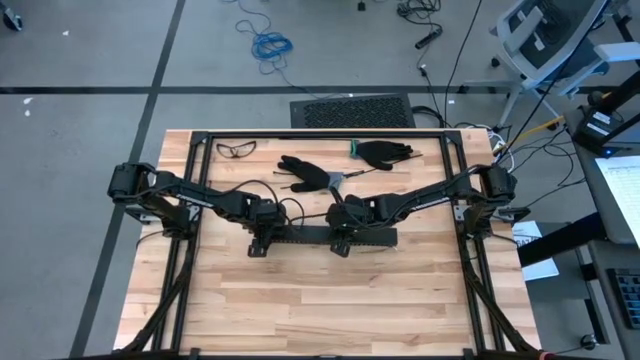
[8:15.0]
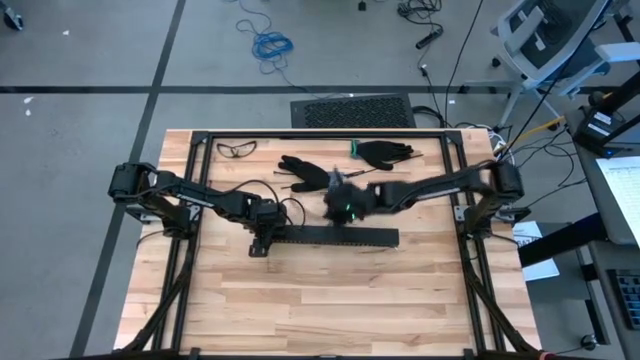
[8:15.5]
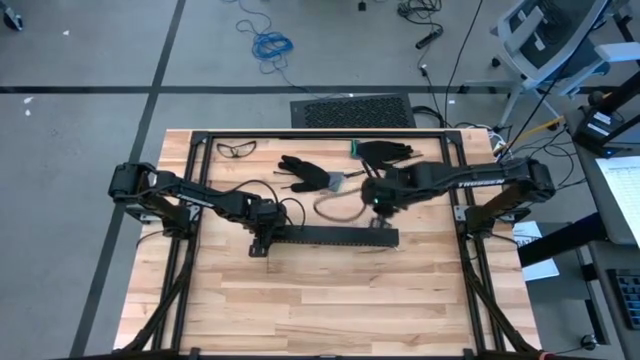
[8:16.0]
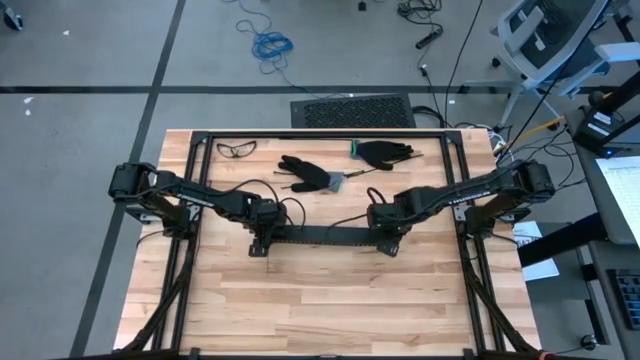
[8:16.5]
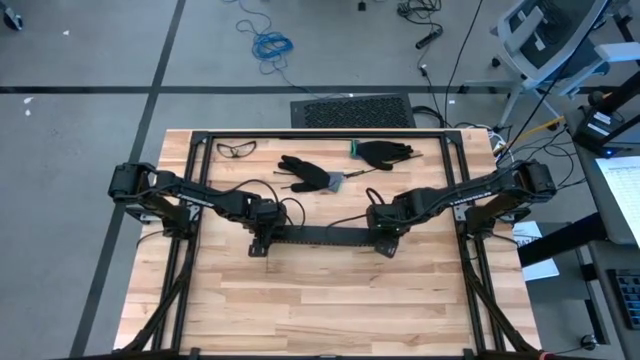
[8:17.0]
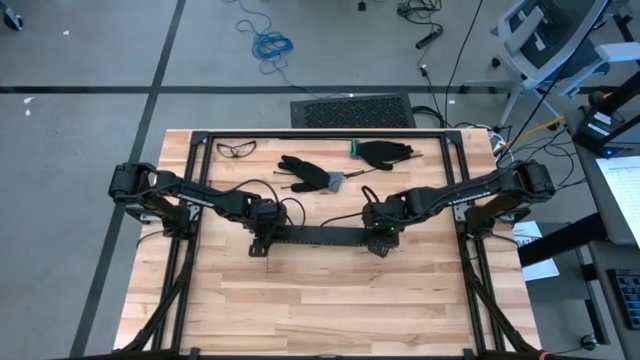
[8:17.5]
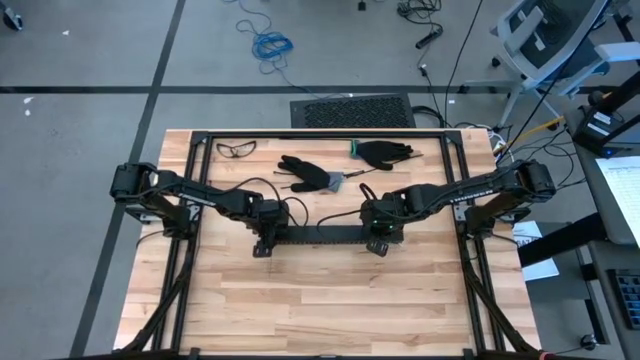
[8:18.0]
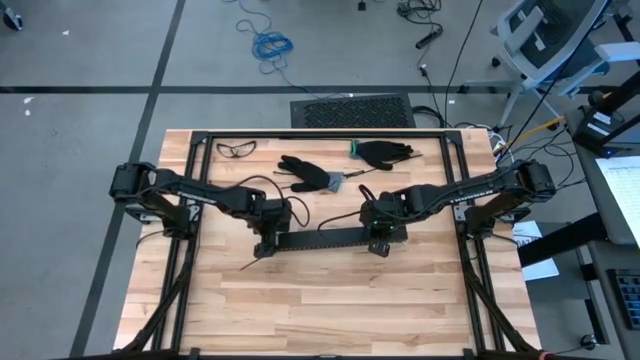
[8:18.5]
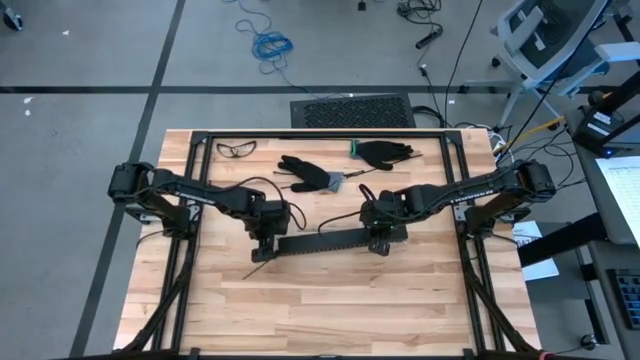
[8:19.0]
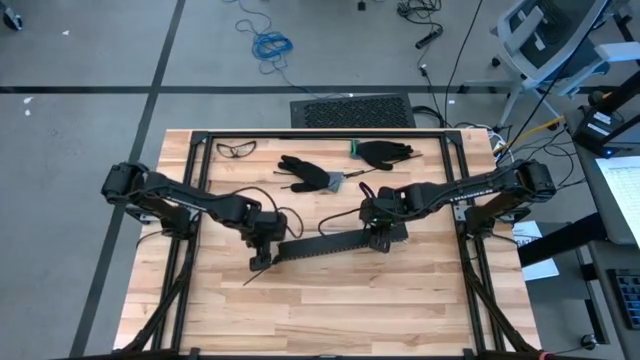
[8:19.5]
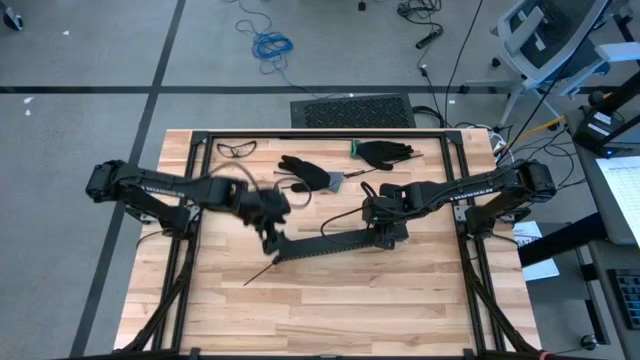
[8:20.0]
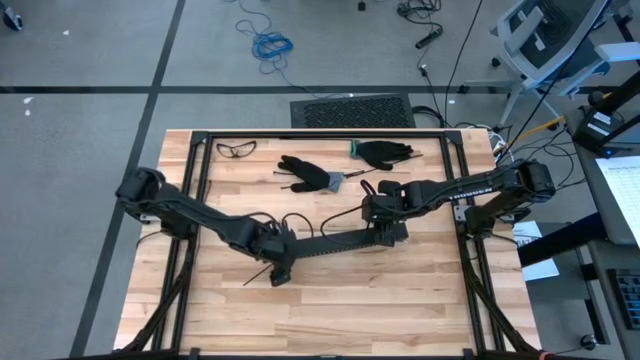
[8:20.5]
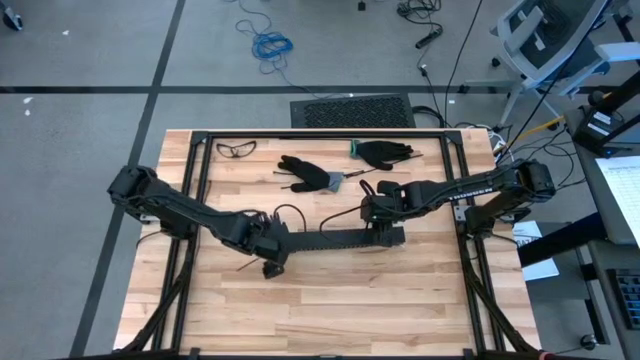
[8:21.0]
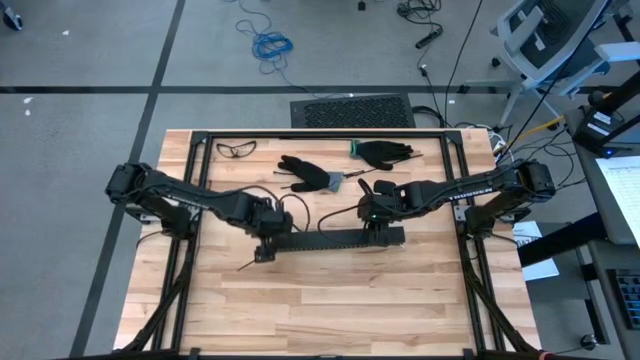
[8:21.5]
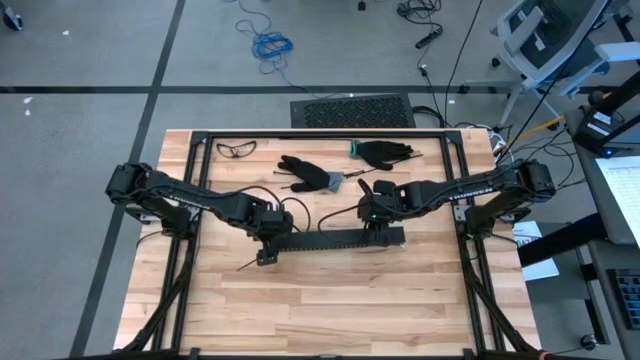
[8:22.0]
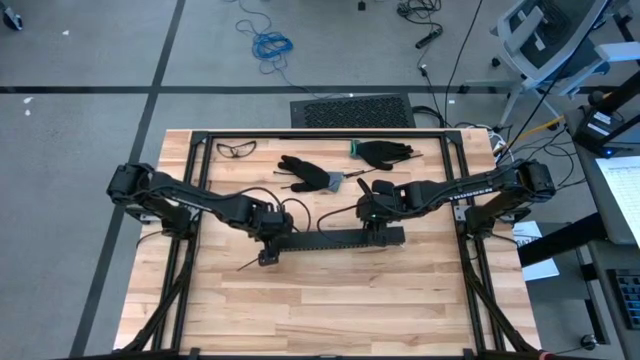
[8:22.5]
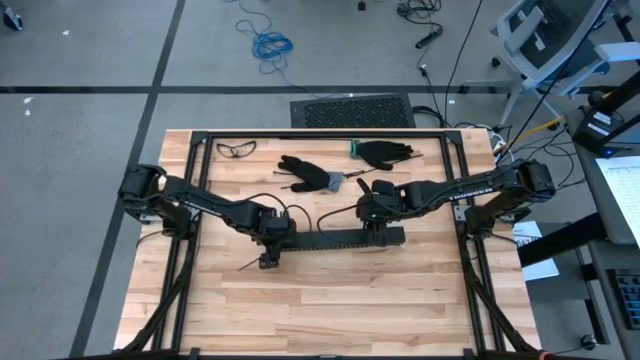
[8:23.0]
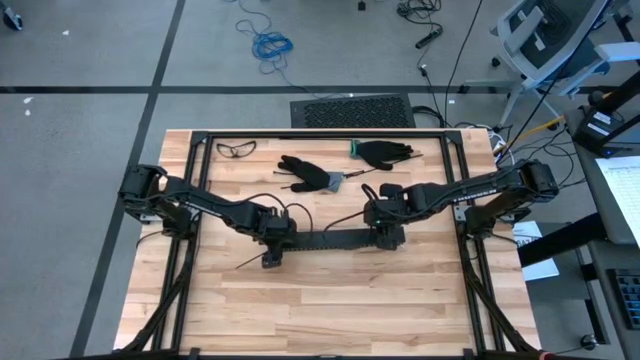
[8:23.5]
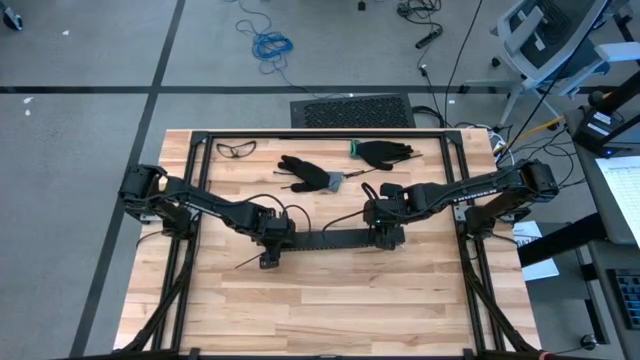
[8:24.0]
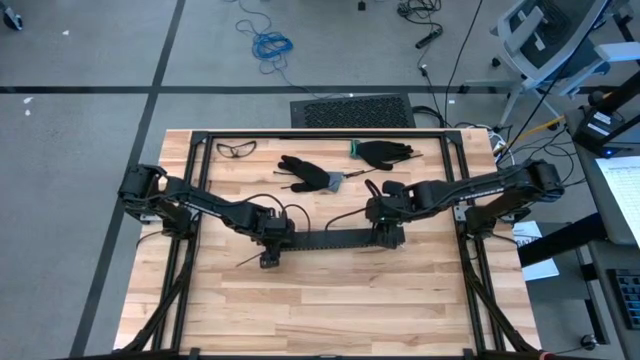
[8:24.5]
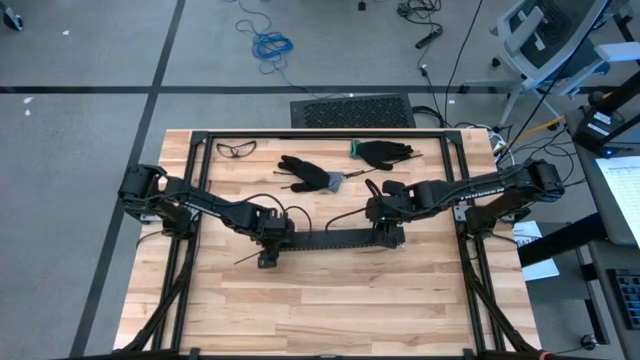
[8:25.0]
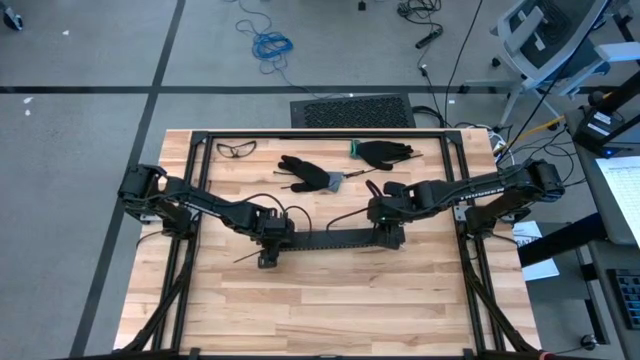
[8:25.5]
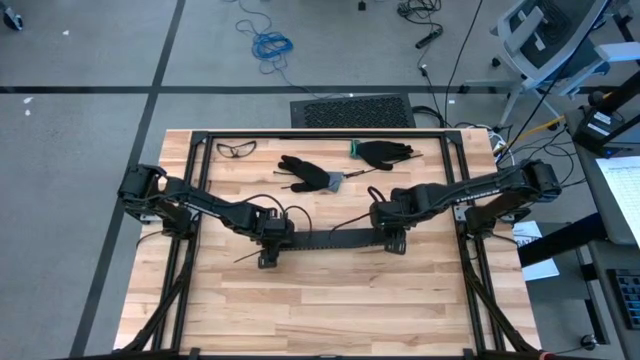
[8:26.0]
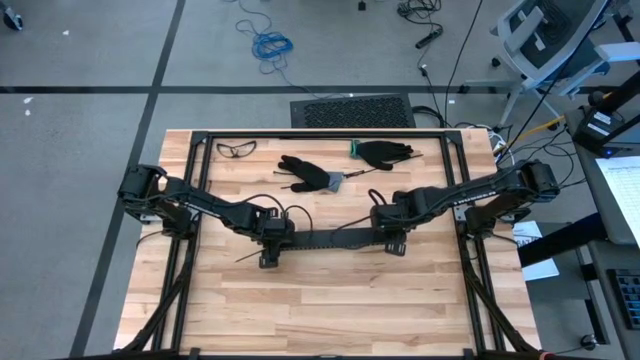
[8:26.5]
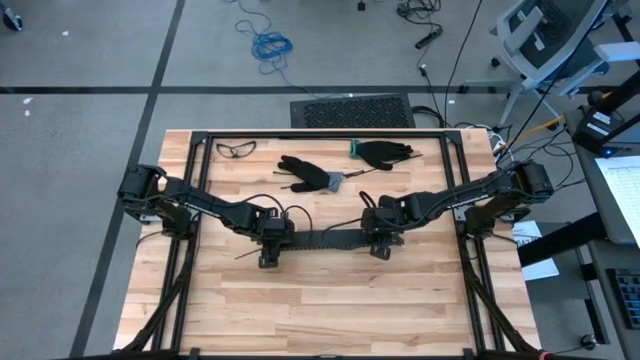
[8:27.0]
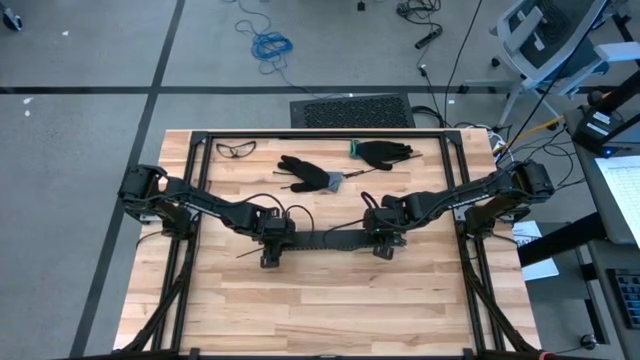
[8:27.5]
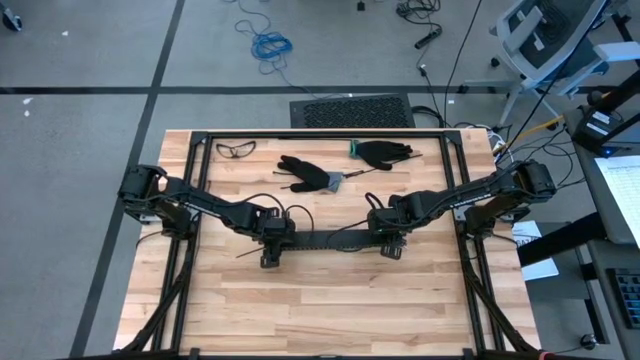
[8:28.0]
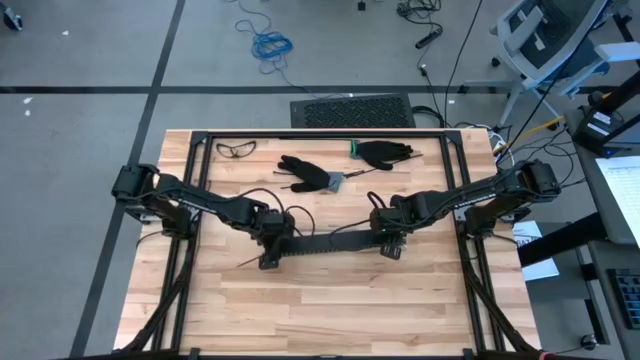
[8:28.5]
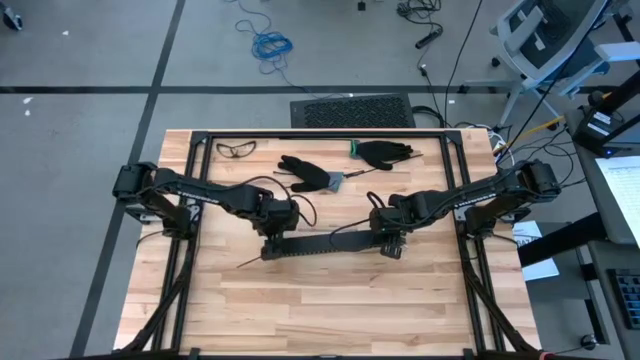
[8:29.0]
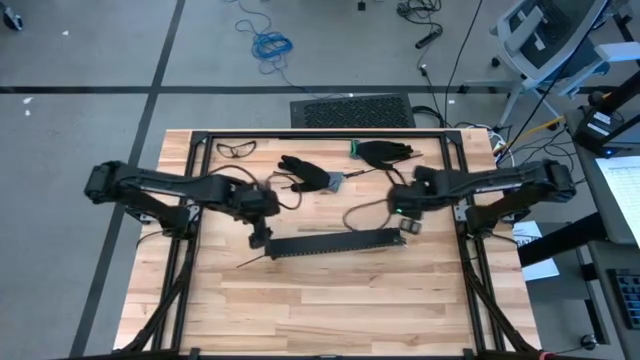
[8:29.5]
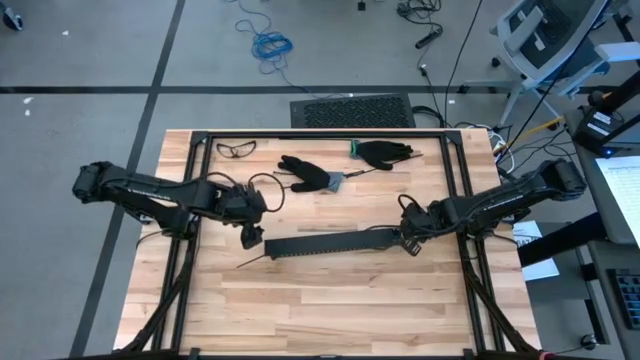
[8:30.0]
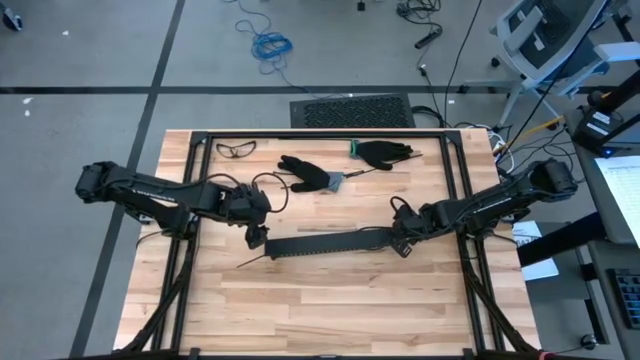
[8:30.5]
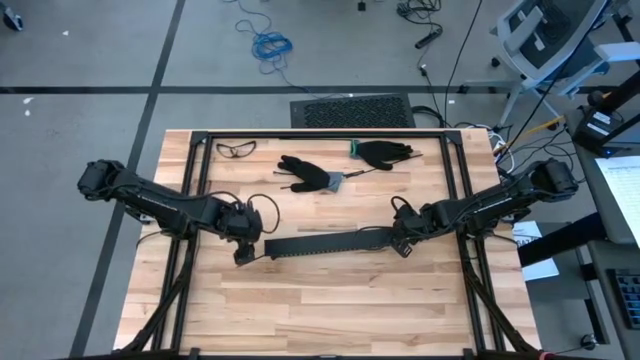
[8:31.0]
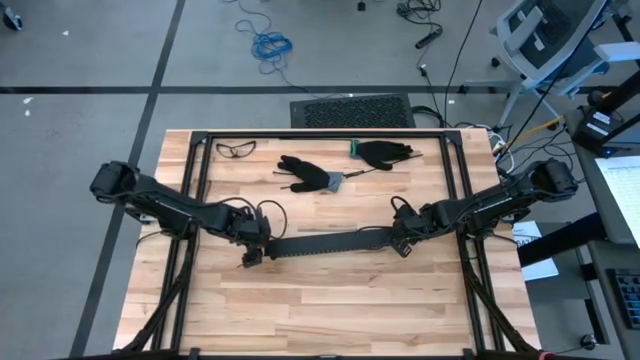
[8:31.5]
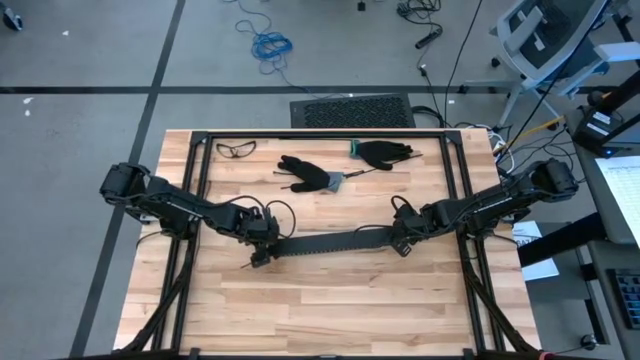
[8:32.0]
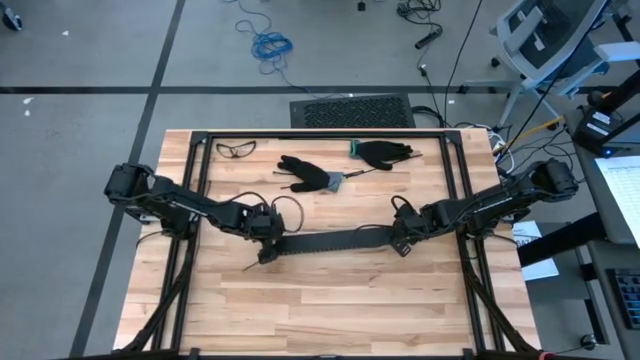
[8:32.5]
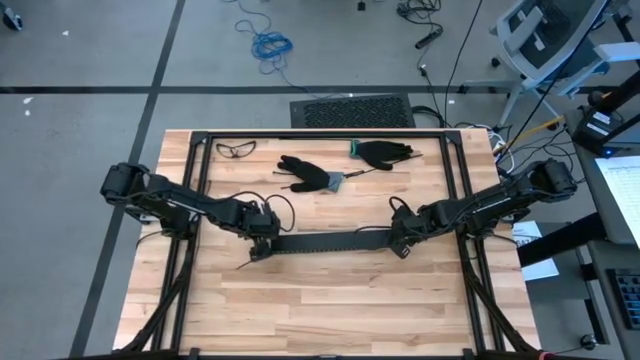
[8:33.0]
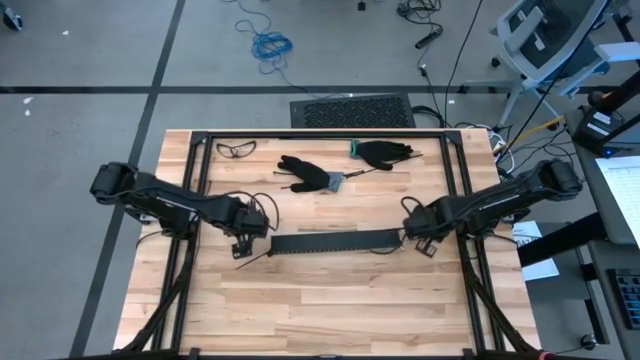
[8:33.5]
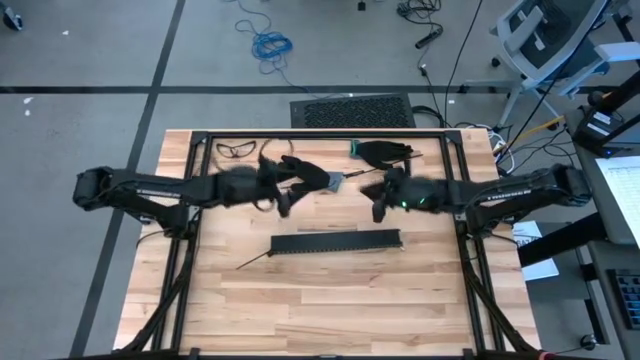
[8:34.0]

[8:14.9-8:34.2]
Task: Ziptie cables
Insert the black cover of the black cable duct

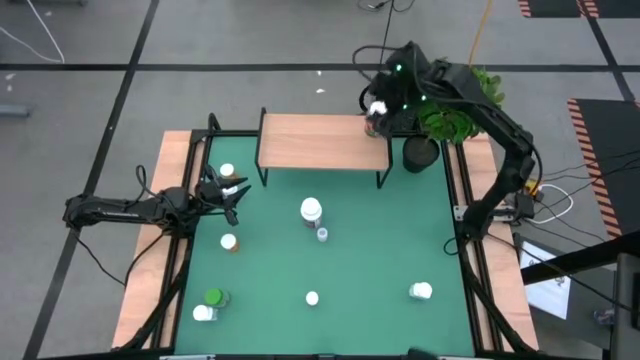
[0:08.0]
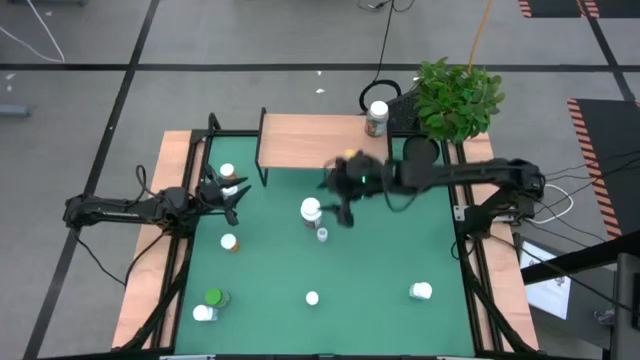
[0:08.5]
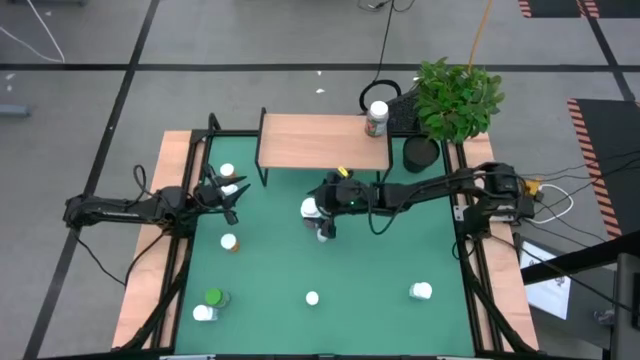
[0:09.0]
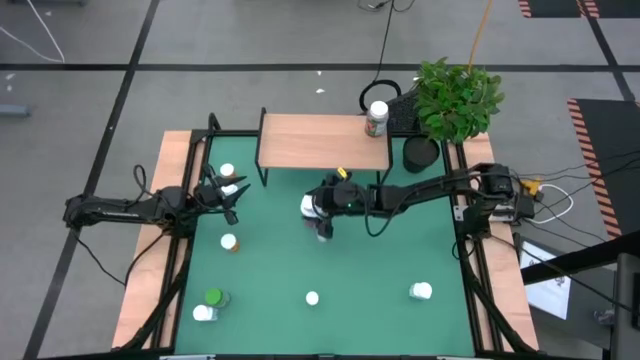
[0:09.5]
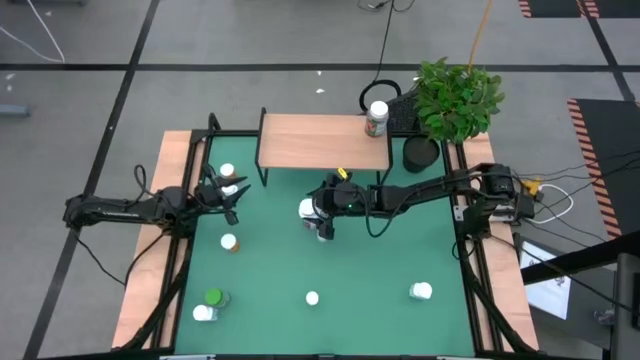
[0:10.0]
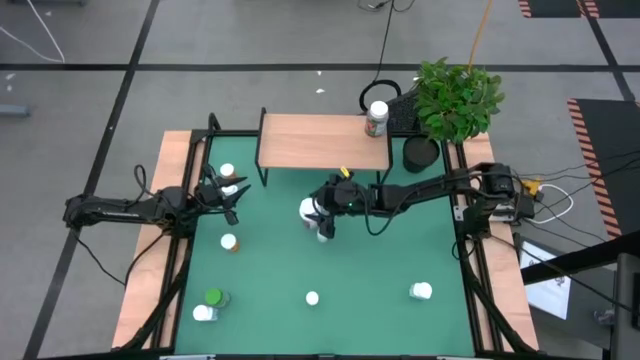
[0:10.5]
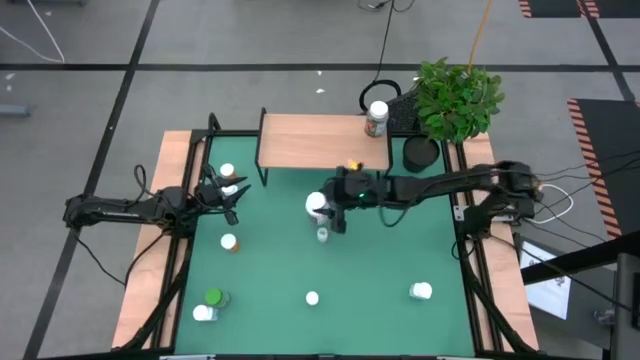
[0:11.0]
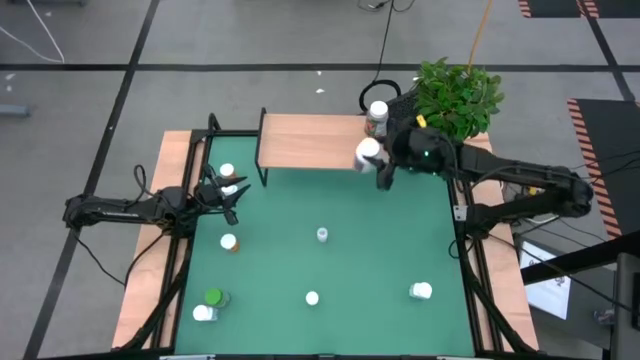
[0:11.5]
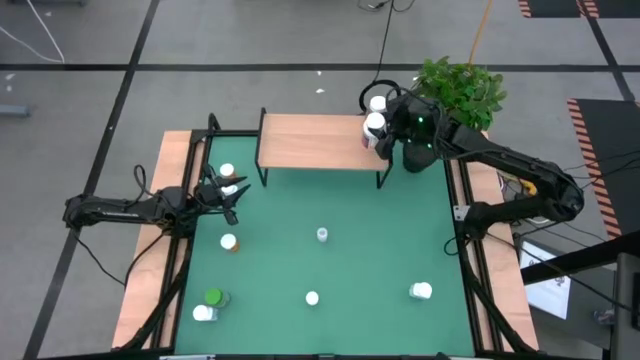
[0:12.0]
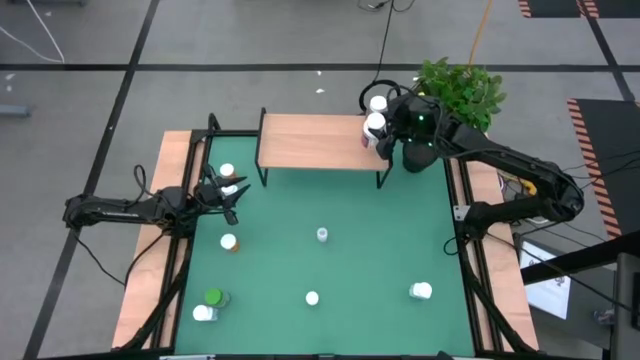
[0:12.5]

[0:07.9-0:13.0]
Task: Pick and place medicine bottles onto shelf by color
Put the big white pill bottle on the shelf
